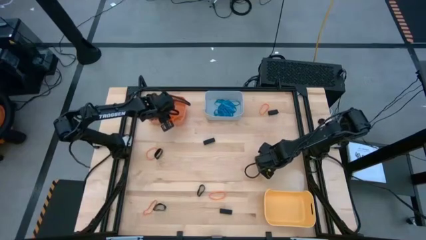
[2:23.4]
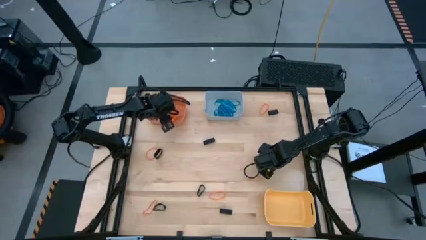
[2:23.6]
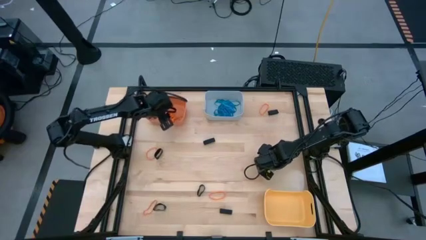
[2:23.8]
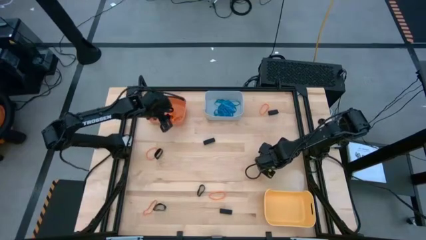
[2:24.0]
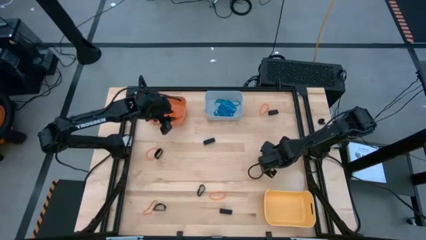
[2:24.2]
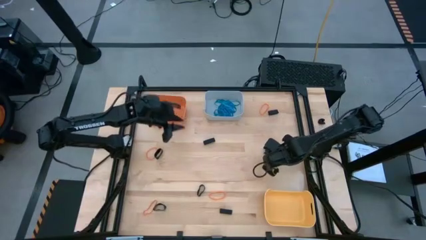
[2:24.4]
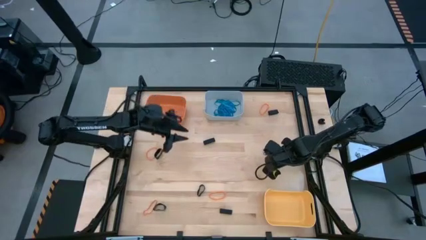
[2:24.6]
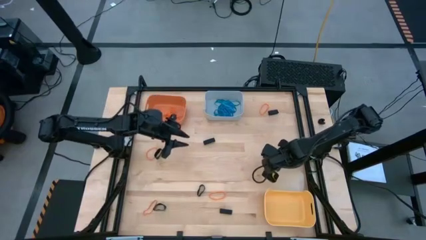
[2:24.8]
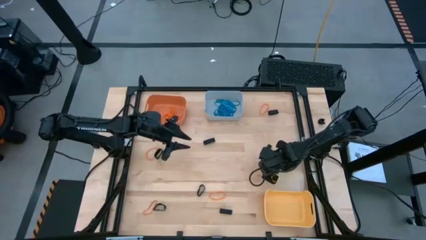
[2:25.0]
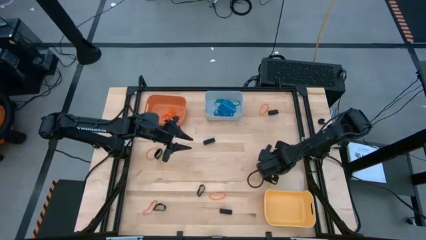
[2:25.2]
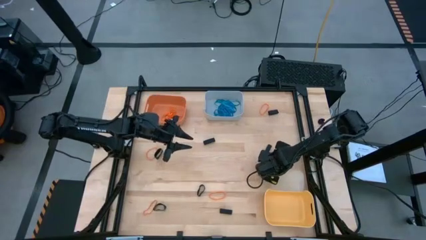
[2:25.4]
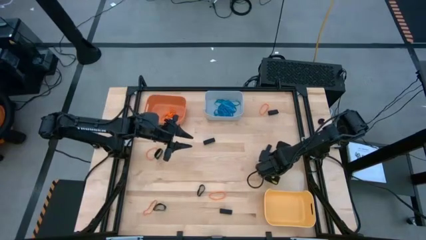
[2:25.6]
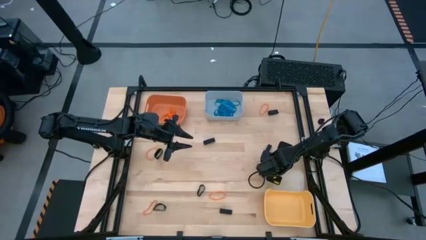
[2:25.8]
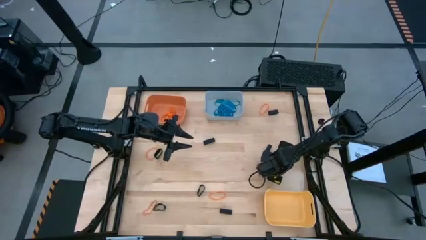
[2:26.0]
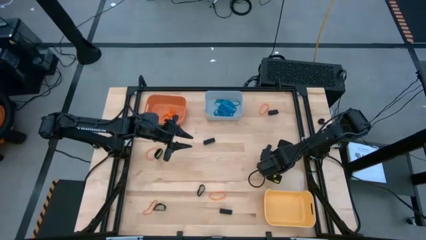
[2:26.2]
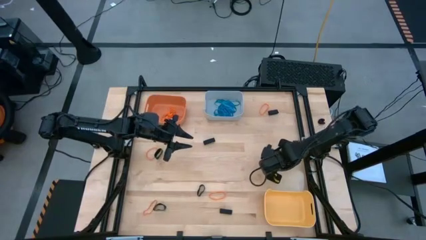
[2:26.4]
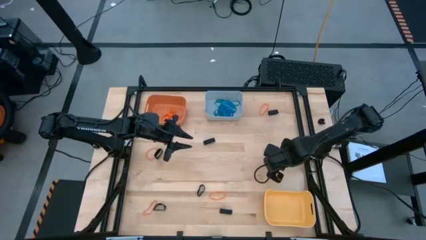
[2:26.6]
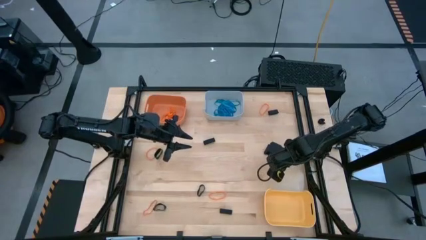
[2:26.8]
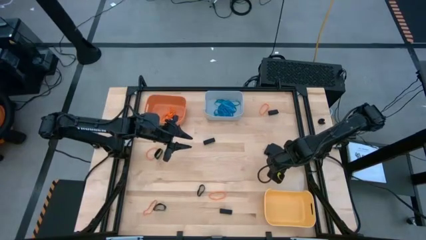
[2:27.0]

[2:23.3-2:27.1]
Task: Sort rubber bands into baskets
Put the orange rubberband into the orange bin

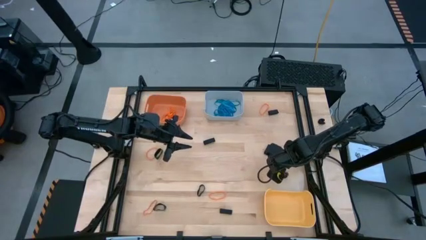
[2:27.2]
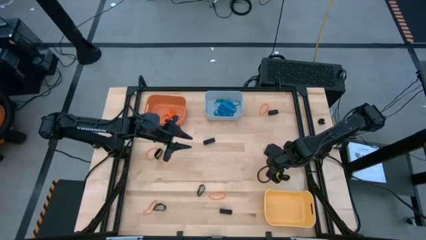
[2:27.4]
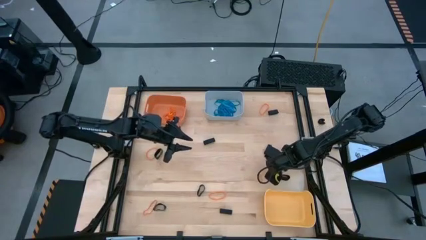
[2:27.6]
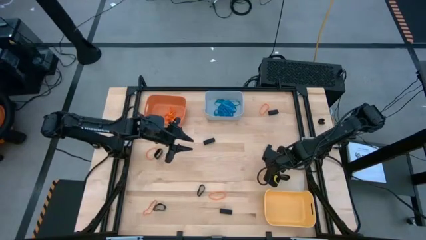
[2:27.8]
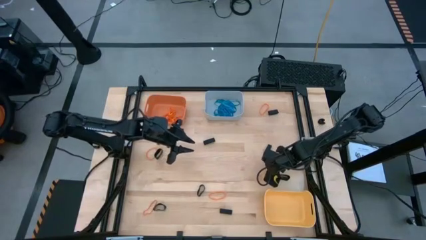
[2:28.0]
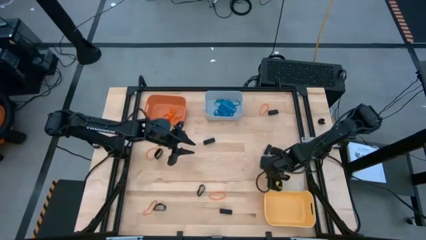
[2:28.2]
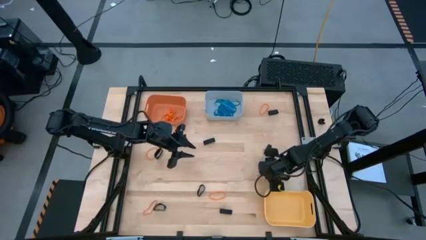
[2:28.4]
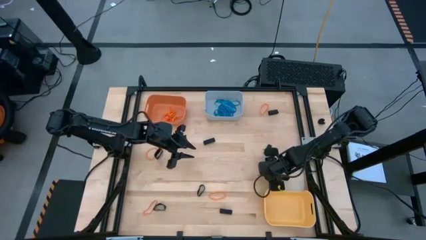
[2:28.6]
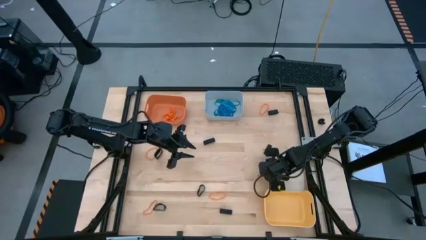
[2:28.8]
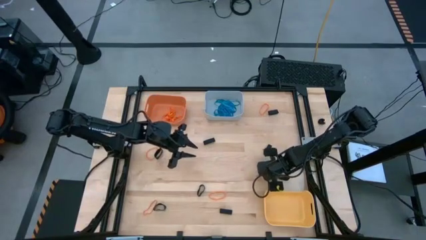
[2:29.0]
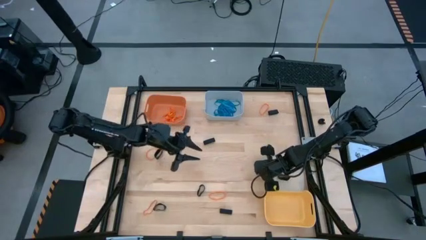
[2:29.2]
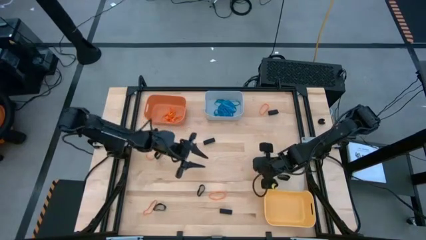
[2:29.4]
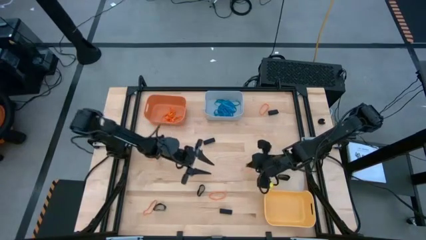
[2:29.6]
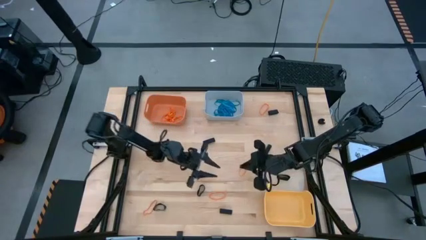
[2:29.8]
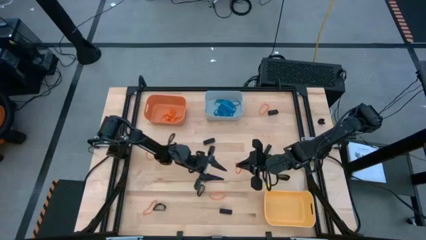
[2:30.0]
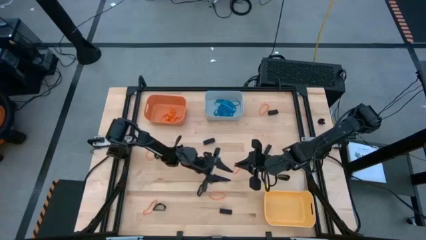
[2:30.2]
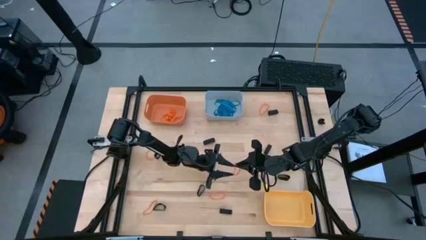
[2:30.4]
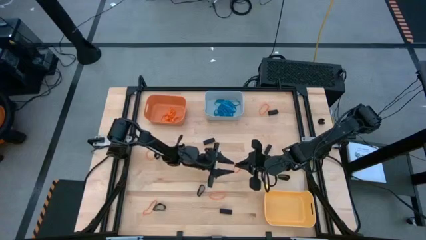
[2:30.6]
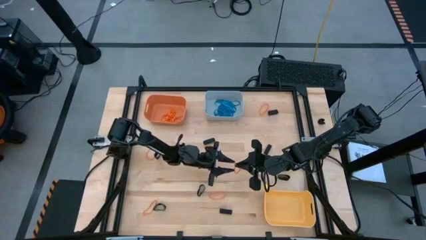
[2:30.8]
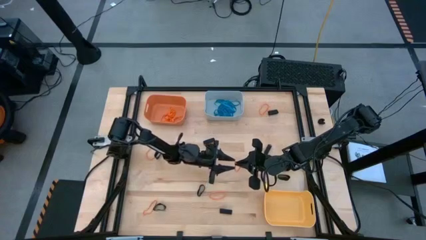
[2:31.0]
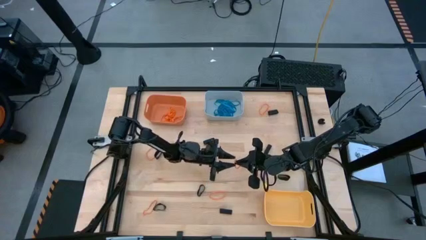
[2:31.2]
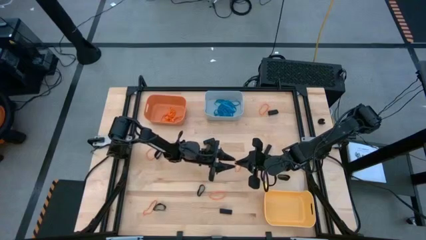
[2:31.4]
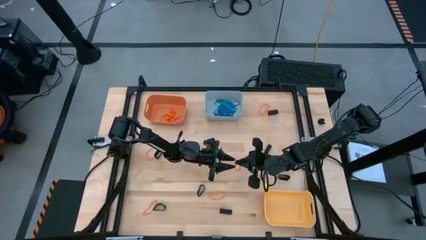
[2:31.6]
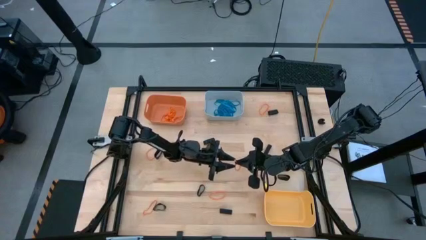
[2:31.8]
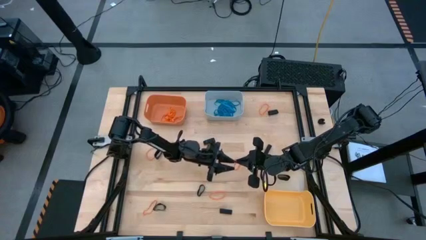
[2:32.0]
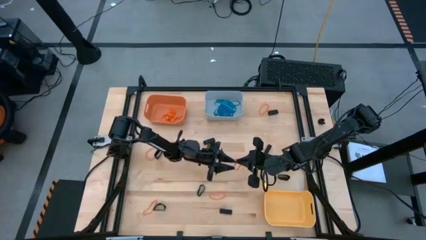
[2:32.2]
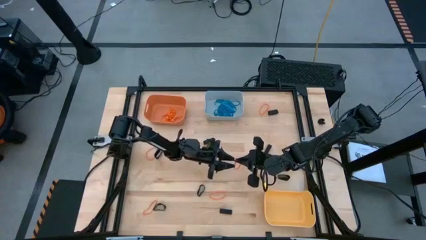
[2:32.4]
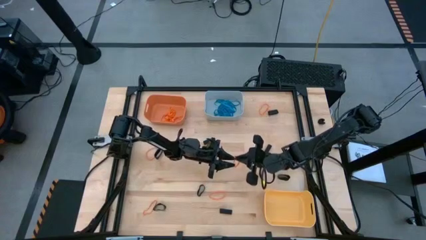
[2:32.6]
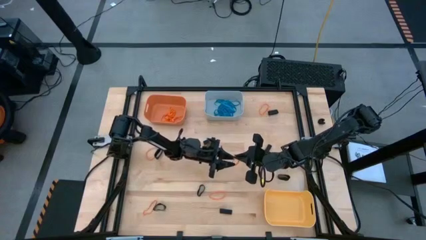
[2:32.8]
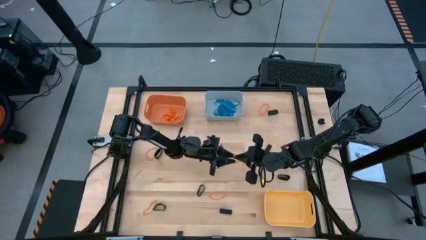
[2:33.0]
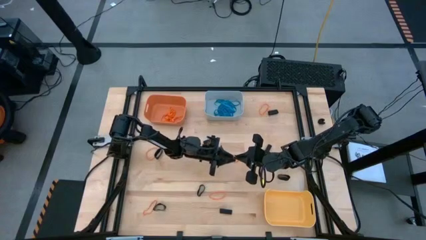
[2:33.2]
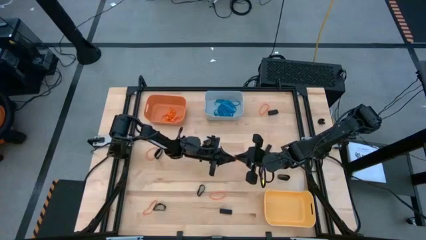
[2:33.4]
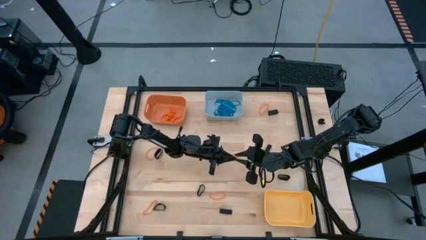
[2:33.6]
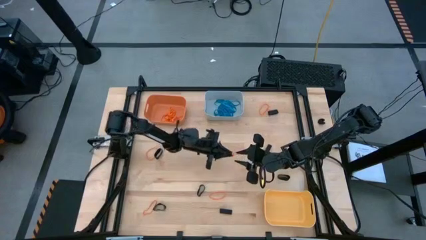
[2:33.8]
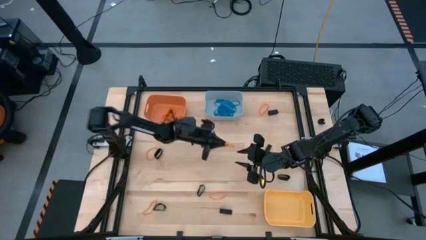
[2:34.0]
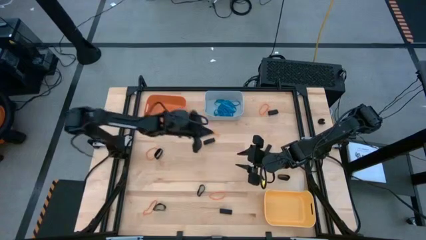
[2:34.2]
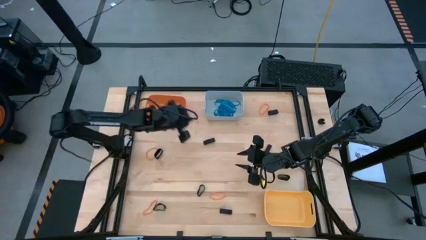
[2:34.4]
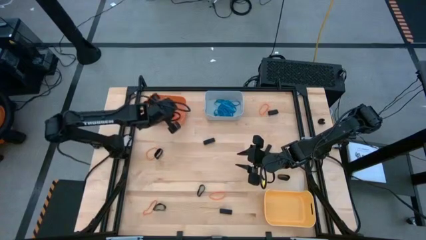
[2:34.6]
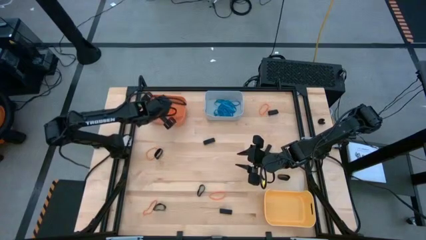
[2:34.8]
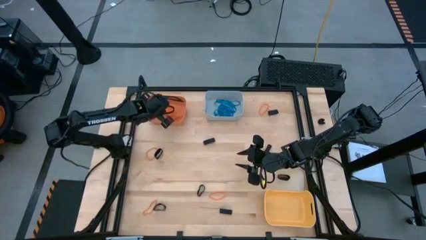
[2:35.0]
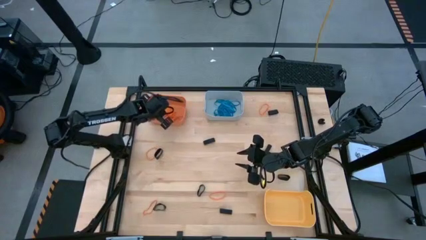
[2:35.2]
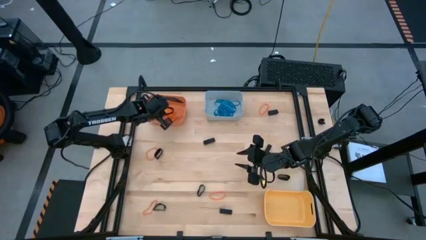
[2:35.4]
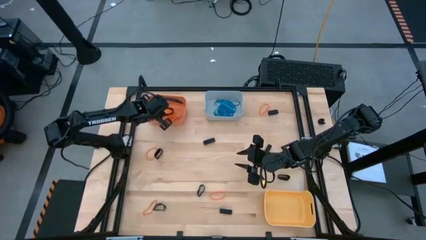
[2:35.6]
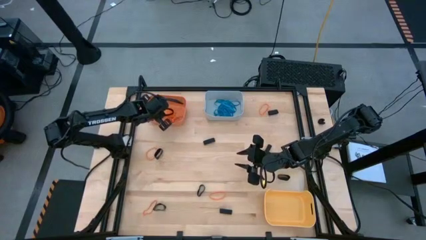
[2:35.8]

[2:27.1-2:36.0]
Put the orange rubberband into the orange bin

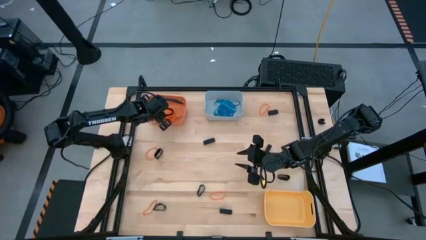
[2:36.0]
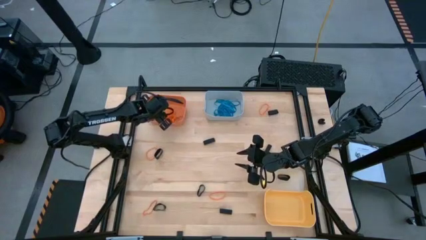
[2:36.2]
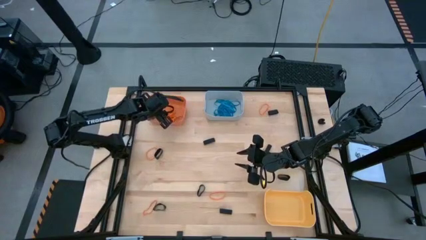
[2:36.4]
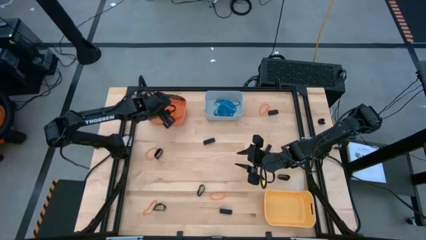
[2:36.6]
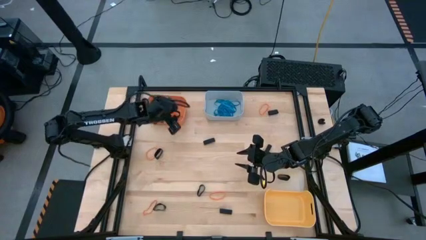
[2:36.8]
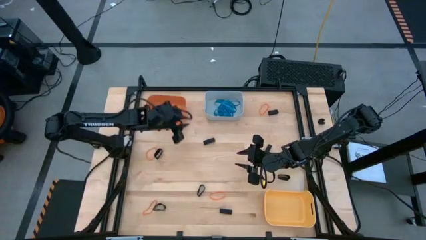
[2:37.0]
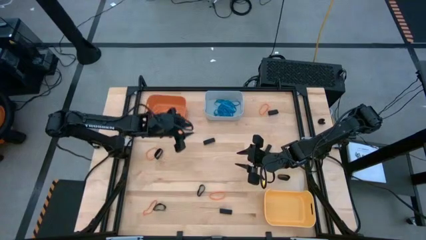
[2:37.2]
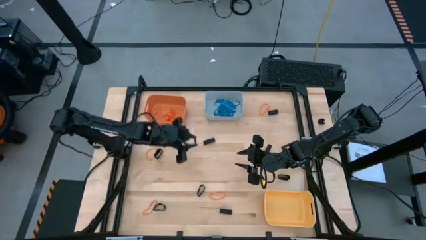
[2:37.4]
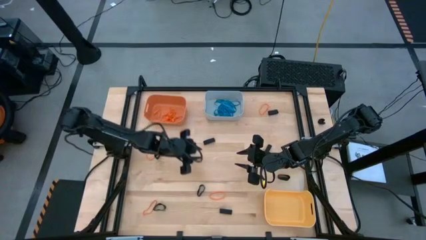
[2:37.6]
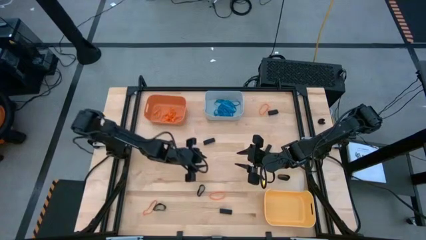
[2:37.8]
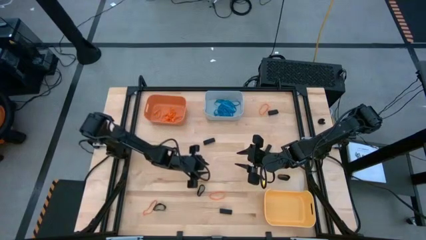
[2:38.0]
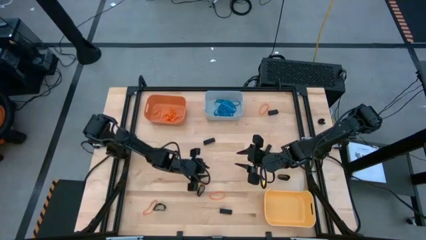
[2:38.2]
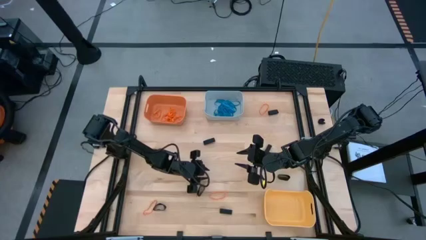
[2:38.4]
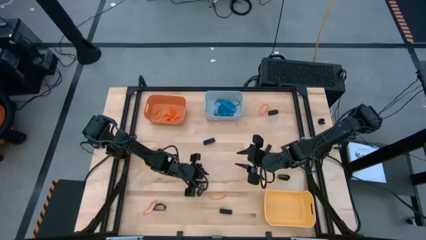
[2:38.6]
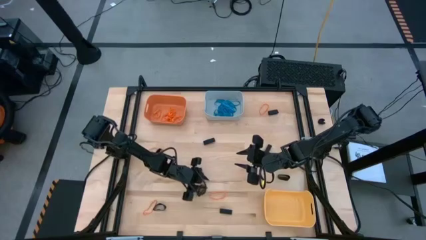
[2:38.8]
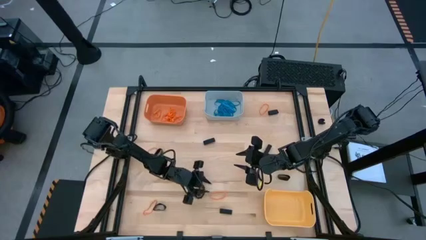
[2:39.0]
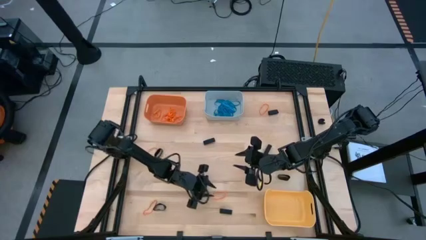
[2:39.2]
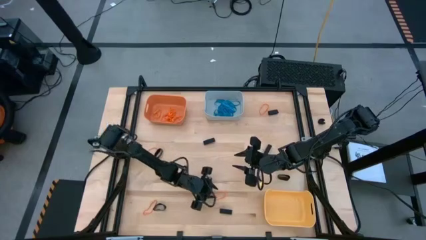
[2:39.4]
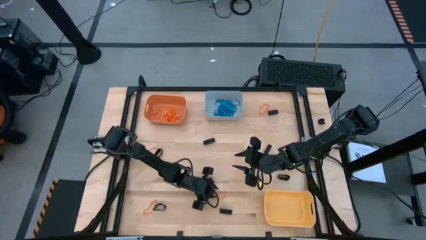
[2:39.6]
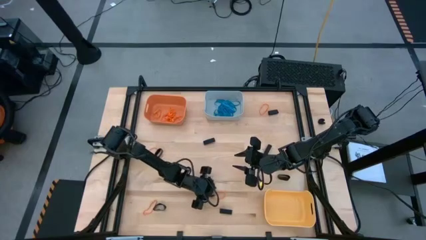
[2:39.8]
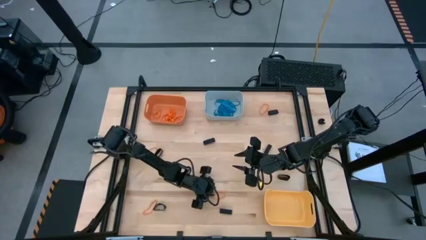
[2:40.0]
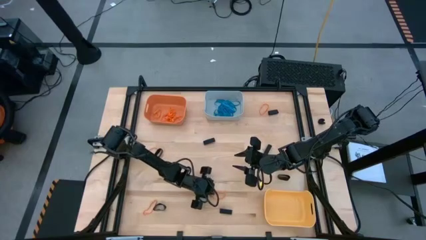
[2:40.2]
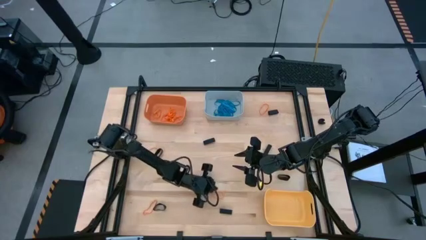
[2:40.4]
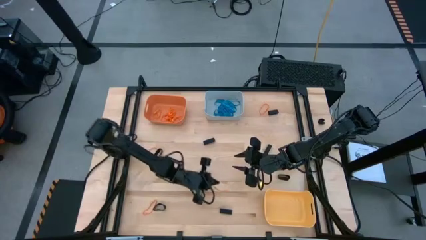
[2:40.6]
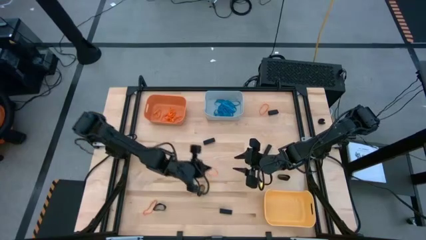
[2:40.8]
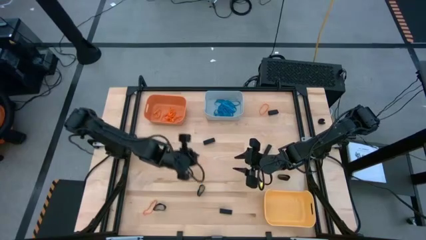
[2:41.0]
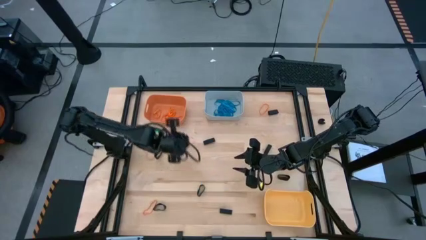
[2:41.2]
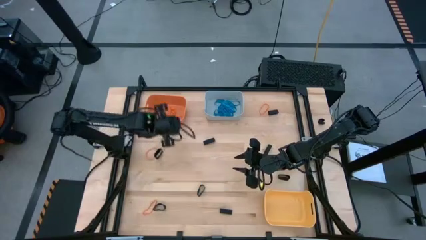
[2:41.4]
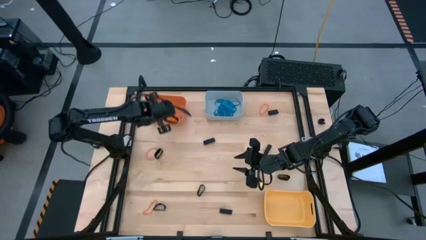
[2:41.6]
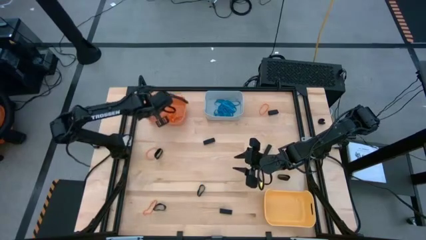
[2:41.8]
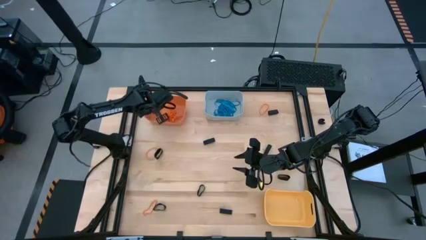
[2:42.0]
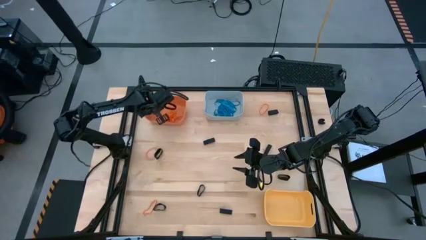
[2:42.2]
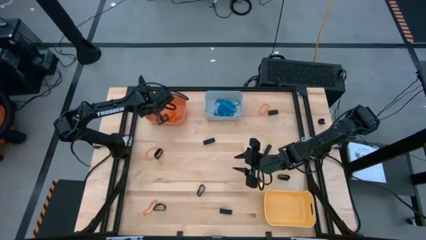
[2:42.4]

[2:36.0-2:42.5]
Put the orange rubberband into the orange bin
